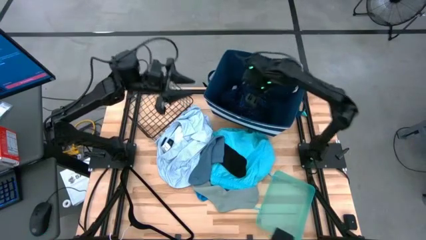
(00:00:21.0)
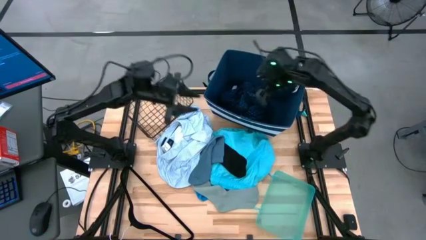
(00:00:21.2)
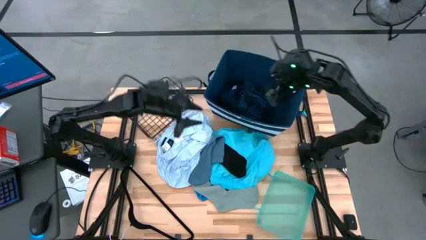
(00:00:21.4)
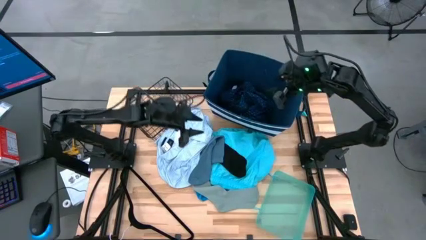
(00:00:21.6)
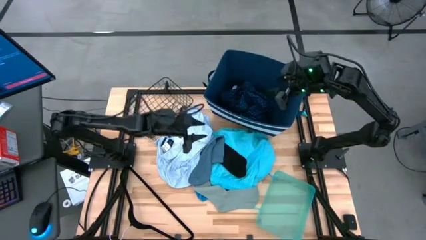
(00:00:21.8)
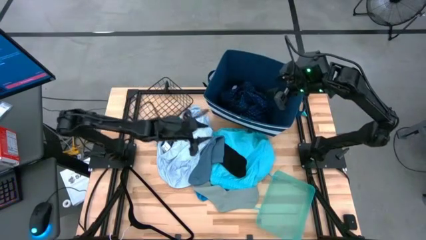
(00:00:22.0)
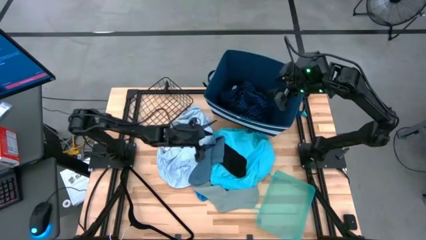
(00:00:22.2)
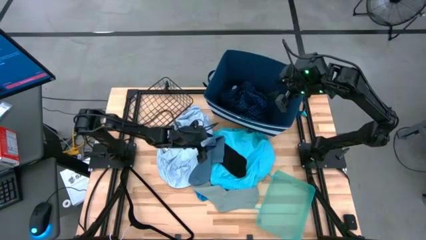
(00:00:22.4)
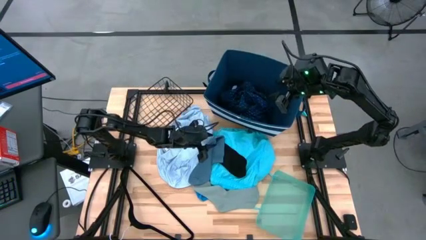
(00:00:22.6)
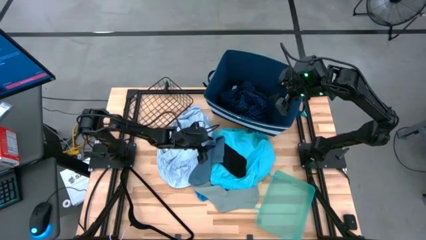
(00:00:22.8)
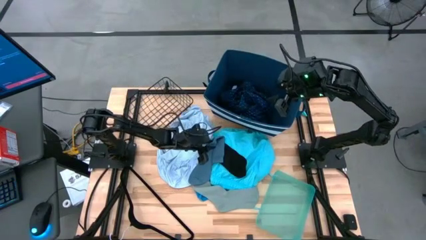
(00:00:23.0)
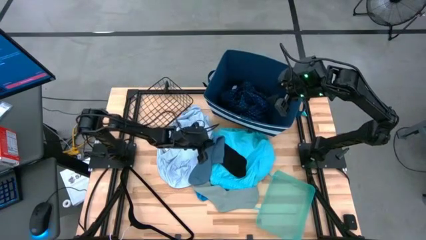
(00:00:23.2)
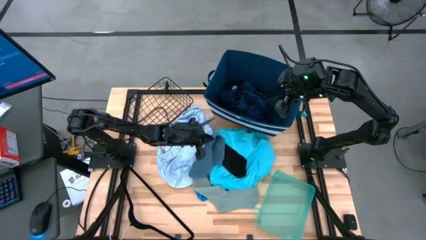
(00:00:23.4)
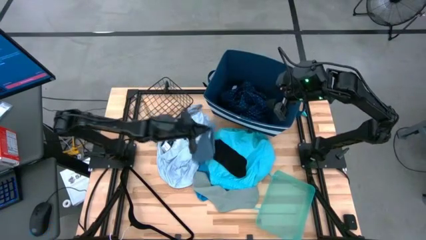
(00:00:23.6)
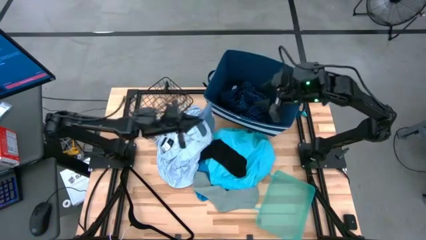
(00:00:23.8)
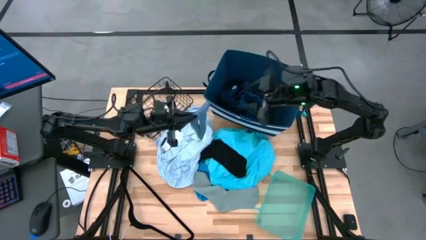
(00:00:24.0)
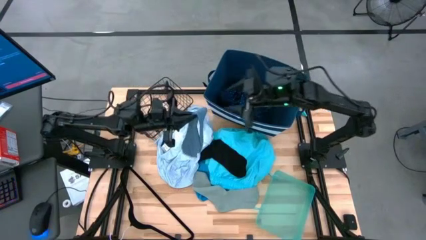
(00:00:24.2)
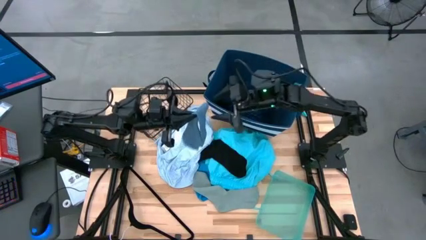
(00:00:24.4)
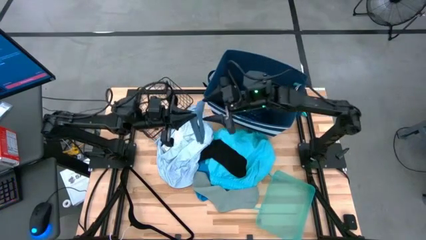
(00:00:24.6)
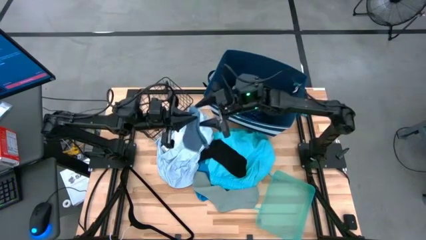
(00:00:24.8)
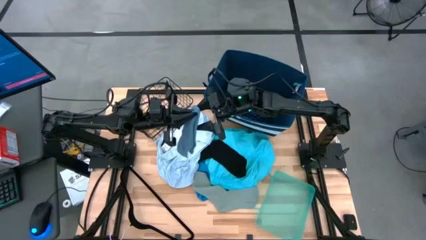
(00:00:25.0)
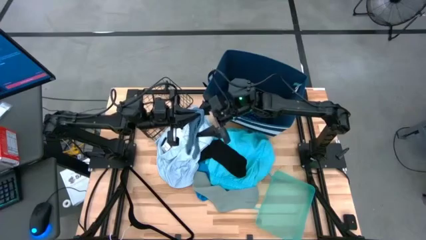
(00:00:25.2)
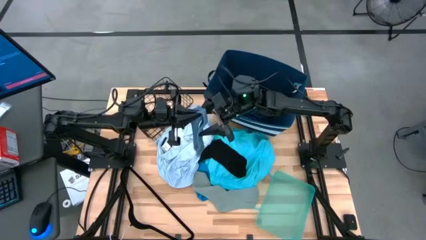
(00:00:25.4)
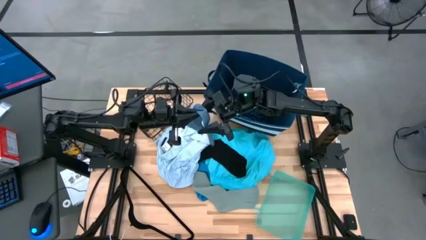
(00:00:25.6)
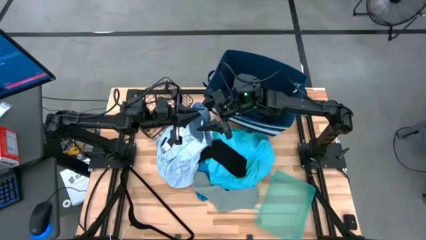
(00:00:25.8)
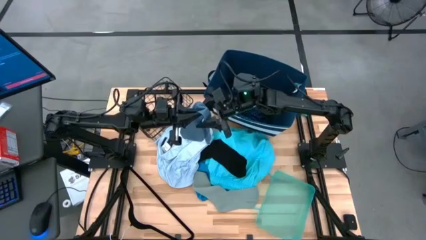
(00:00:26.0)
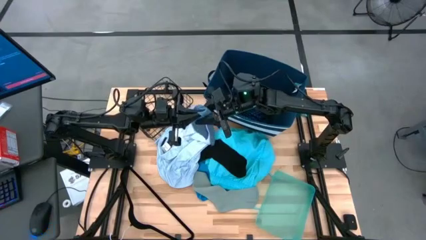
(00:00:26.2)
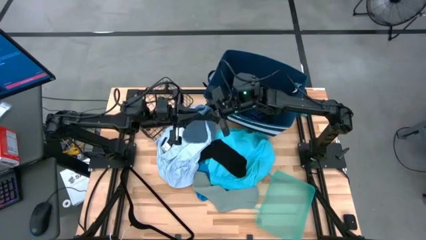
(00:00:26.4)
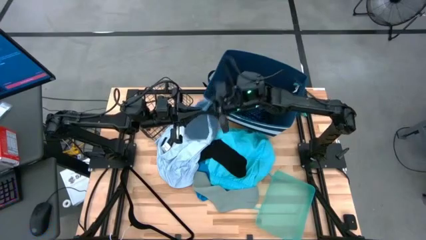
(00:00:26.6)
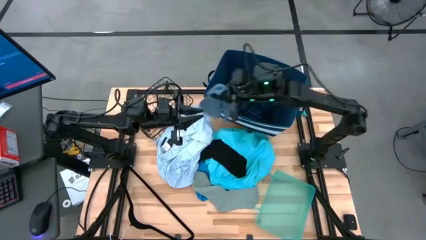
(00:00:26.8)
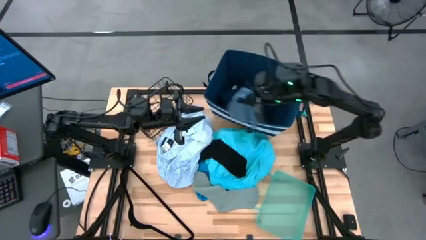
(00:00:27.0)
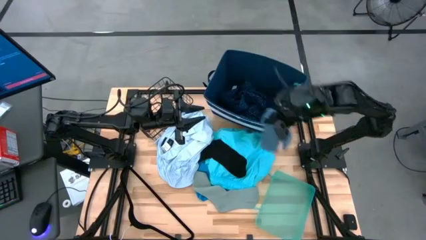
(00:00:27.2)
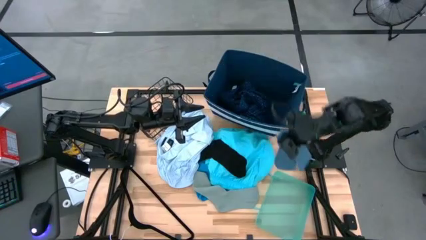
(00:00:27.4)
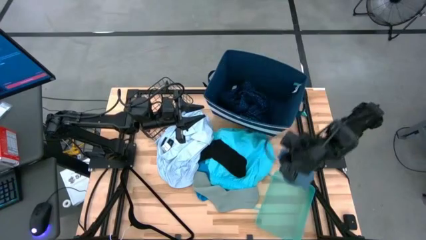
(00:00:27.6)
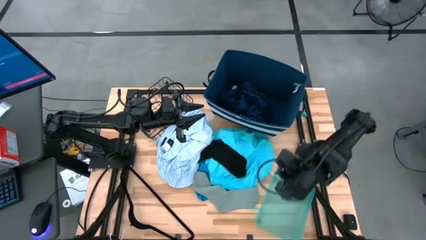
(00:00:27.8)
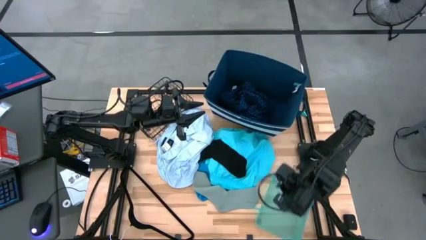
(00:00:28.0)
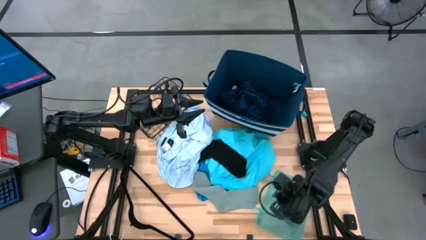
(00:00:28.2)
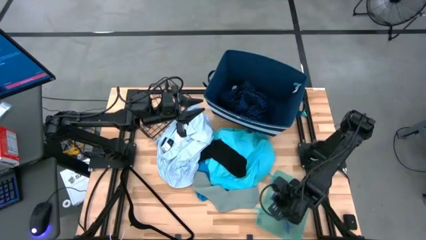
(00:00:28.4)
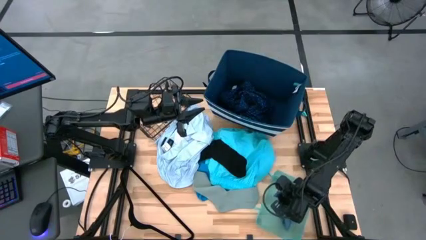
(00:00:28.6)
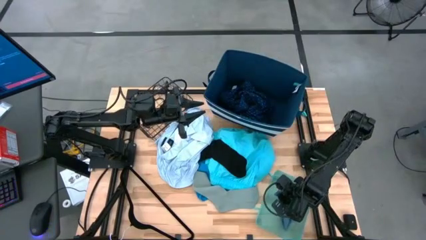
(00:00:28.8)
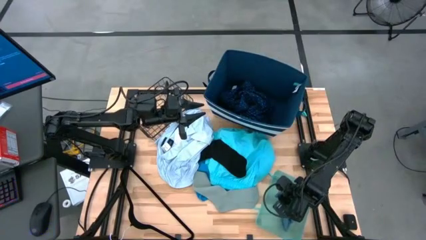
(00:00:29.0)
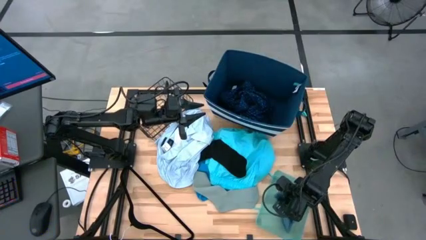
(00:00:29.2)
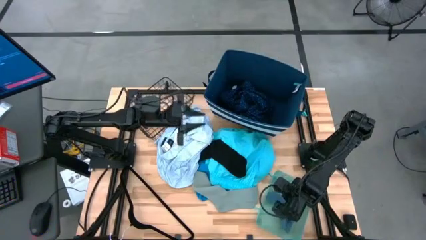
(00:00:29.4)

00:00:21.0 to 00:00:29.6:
Task: Pick & Place Cloths
Put the dark gray sock into the green bin

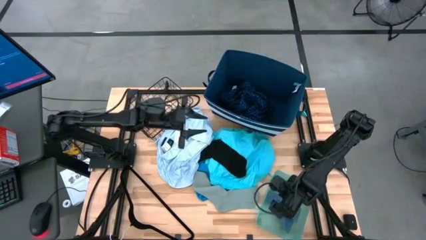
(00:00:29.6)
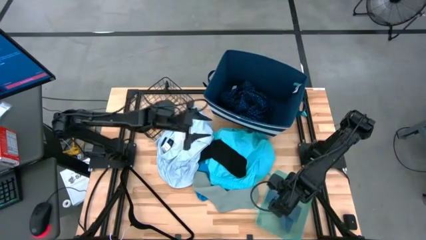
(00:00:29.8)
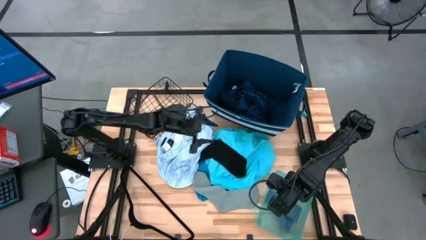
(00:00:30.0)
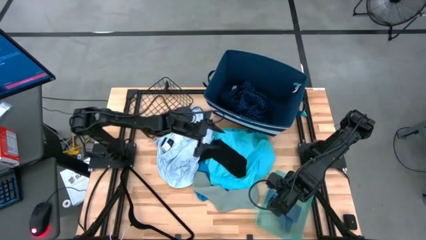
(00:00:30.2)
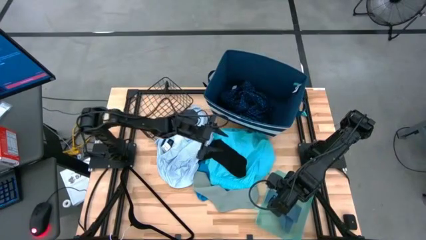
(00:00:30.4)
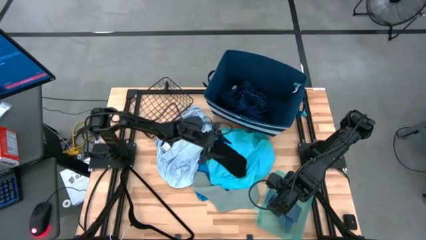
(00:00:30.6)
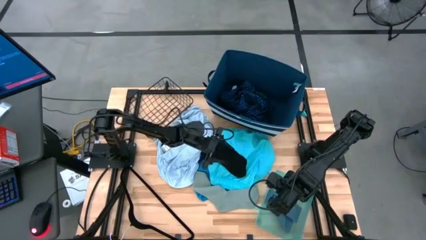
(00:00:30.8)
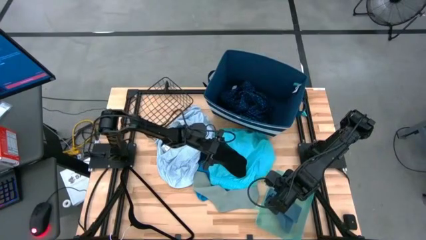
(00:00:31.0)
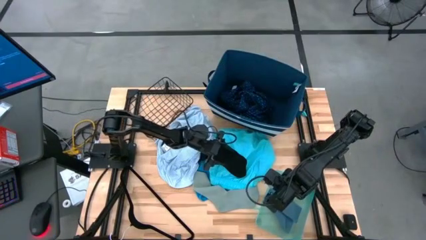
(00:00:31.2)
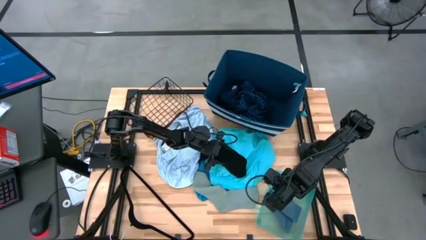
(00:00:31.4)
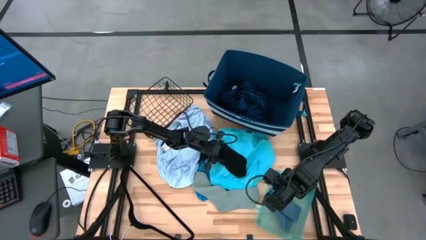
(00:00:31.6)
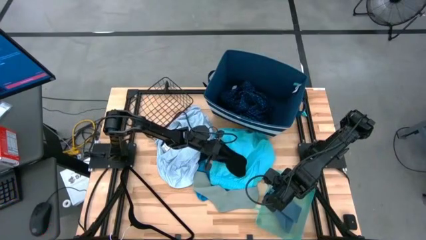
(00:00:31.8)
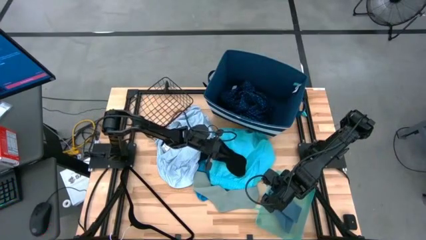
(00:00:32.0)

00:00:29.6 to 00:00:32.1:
Put the black sock into the green bin
